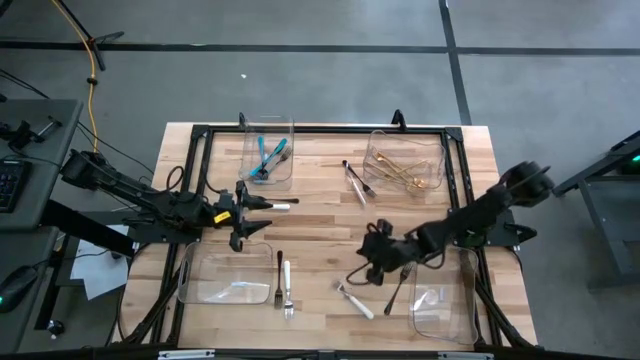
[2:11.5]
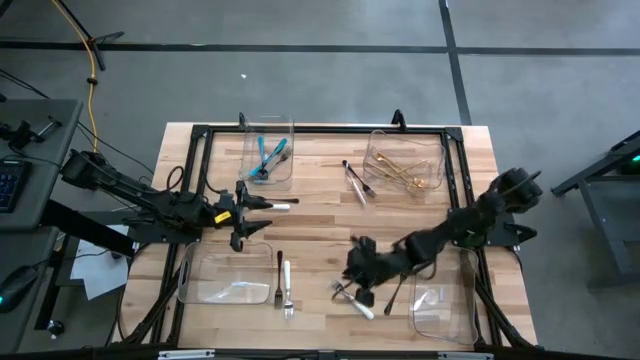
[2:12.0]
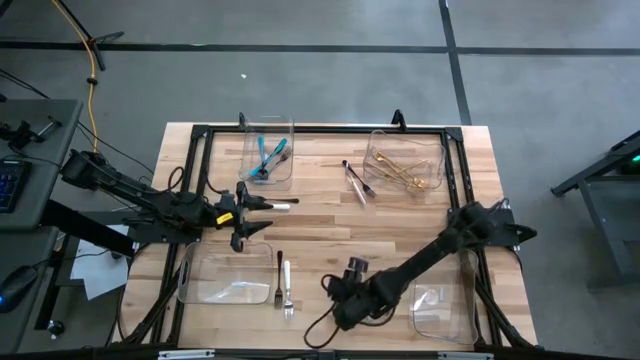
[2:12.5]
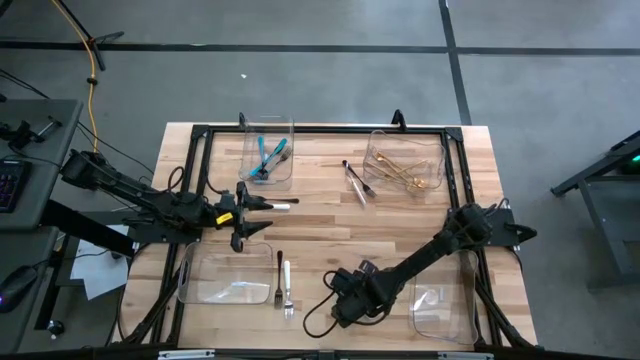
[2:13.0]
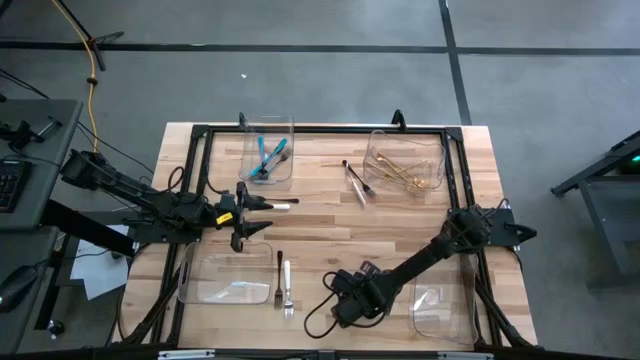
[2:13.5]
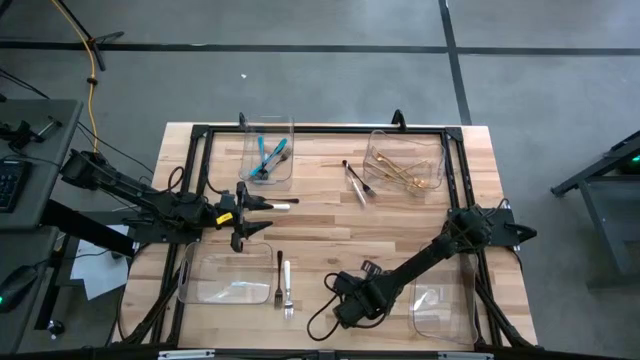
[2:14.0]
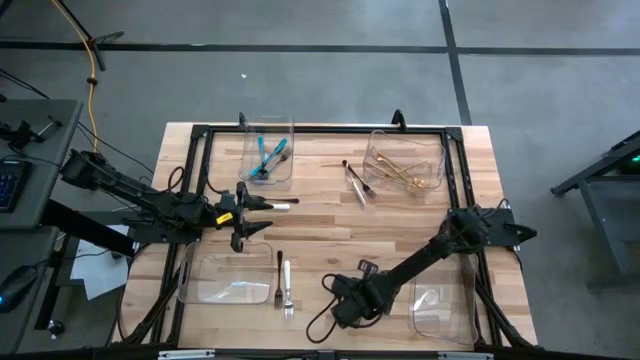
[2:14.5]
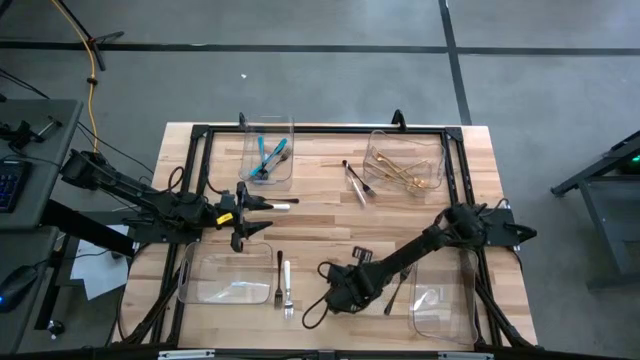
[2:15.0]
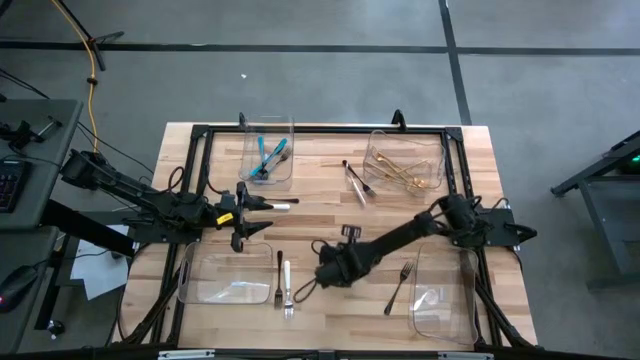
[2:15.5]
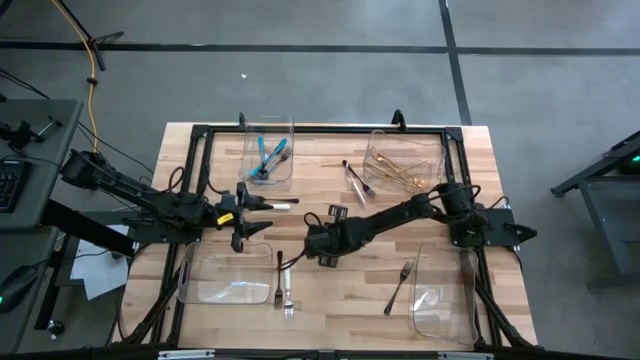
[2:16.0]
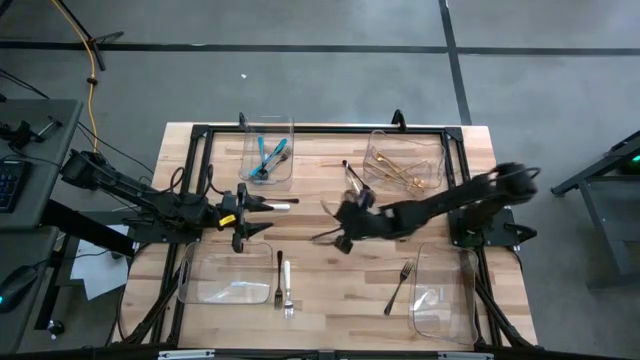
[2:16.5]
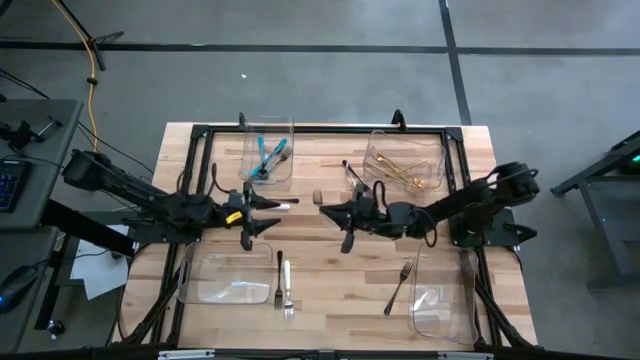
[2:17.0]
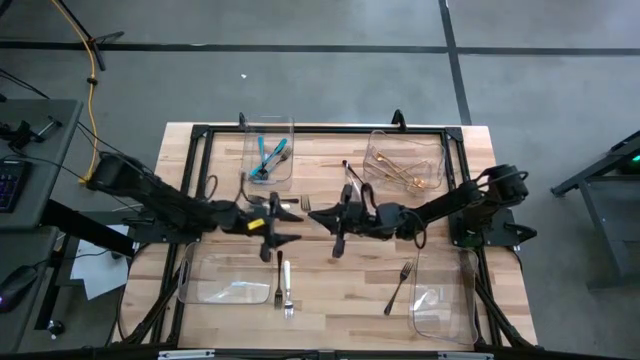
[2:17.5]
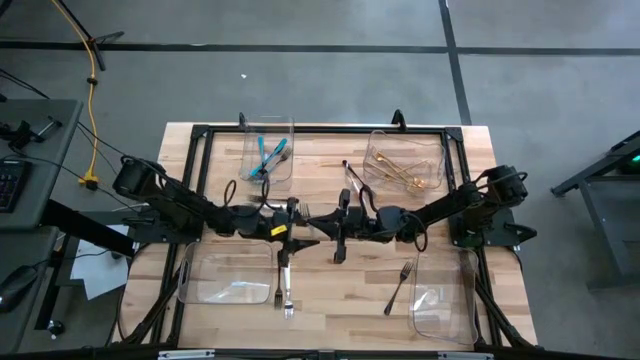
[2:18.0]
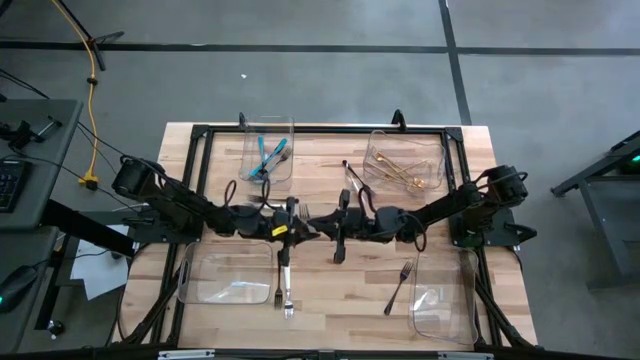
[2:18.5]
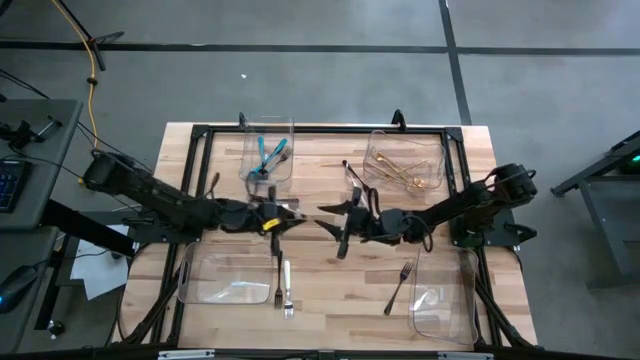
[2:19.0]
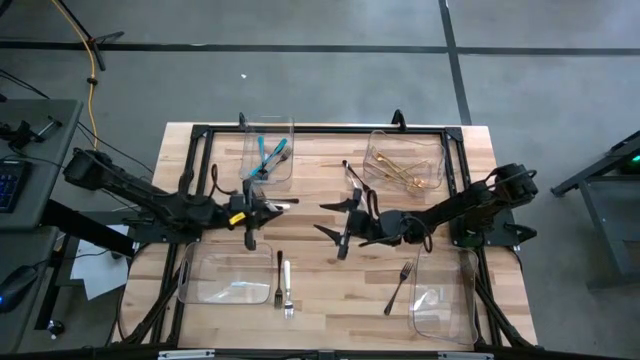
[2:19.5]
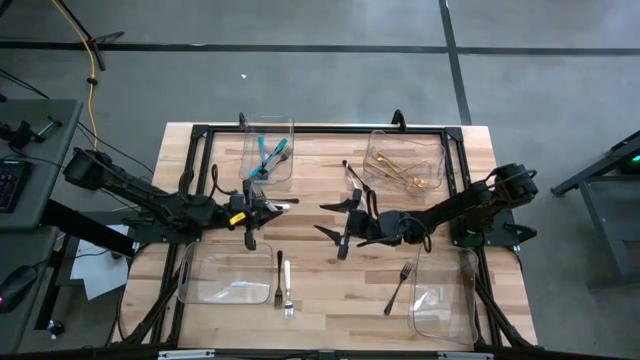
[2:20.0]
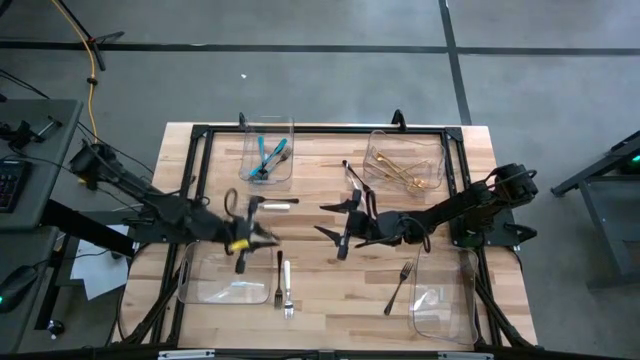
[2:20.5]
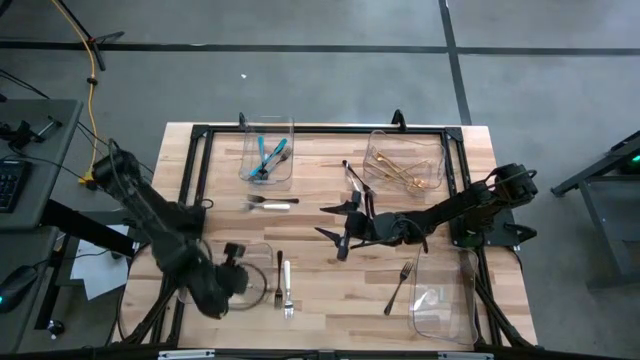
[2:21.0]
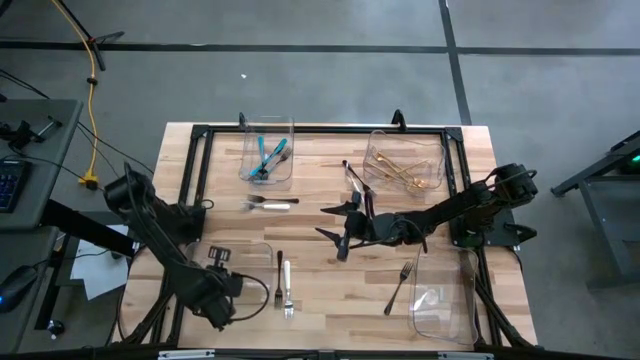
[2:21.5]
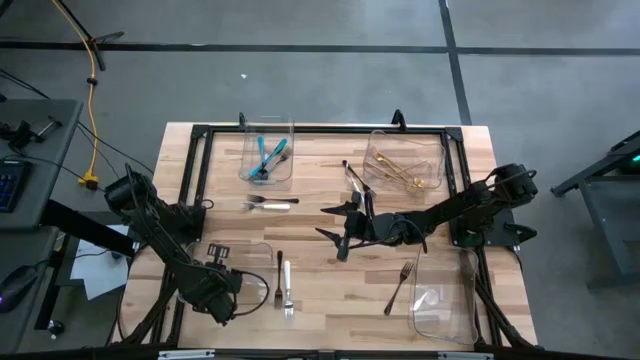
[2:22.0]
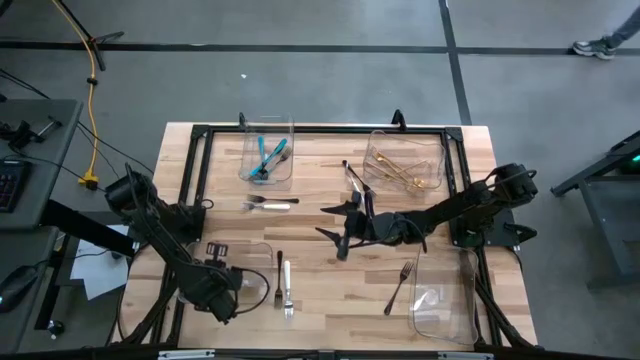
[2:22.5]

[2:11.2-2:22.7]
Task: Sort silverware by color (type)
Put the white fork into the bottom left transparent bin

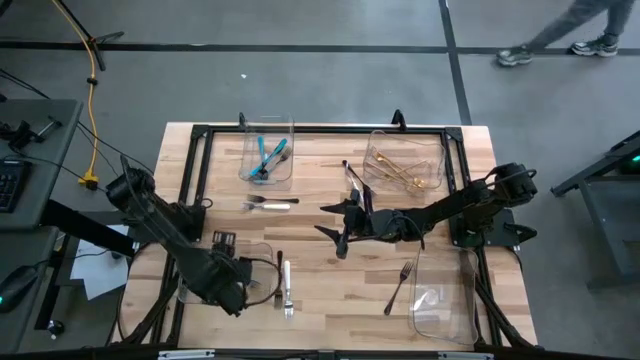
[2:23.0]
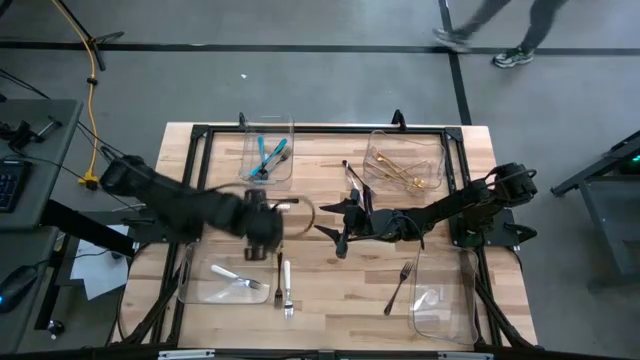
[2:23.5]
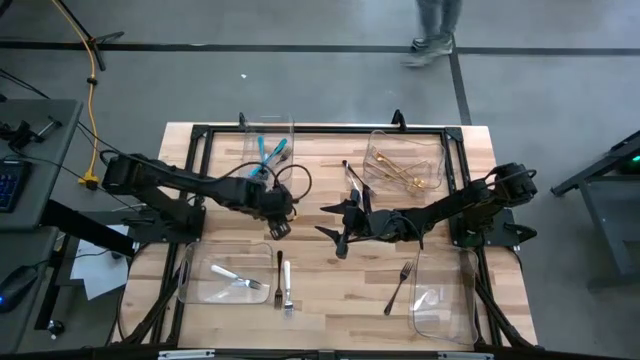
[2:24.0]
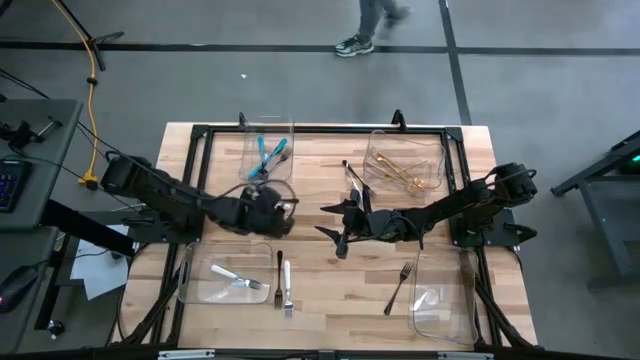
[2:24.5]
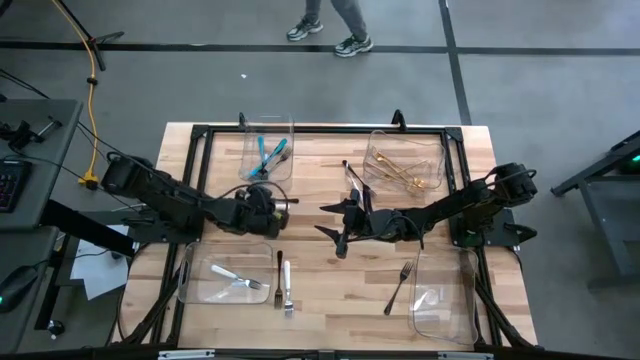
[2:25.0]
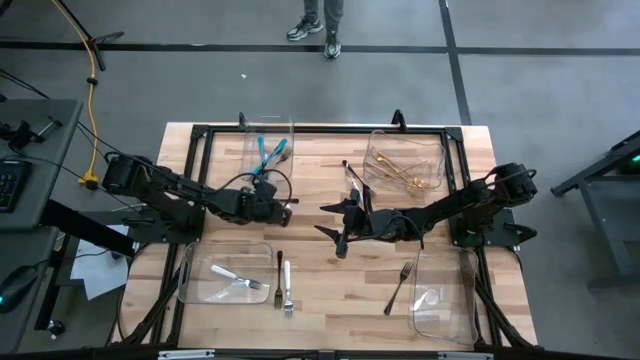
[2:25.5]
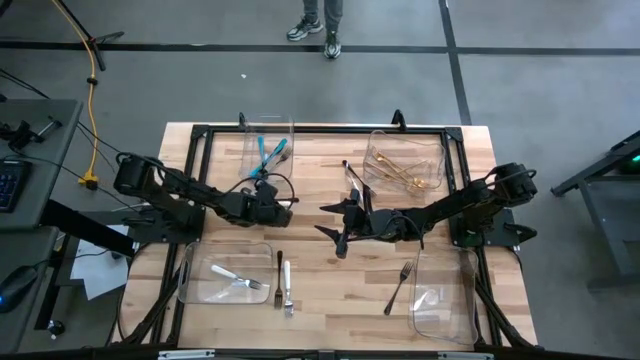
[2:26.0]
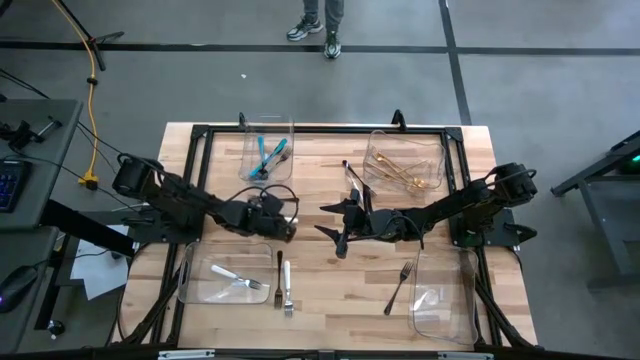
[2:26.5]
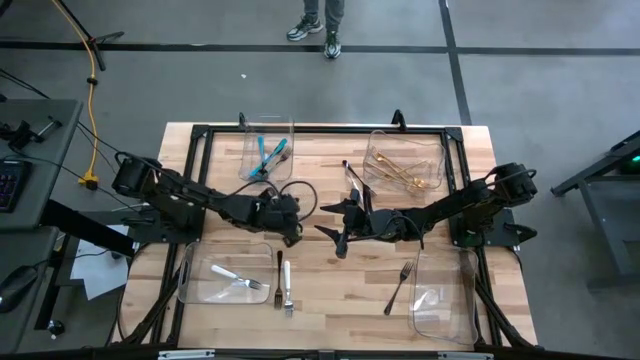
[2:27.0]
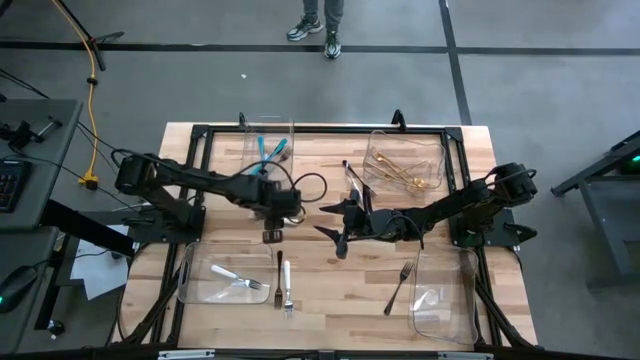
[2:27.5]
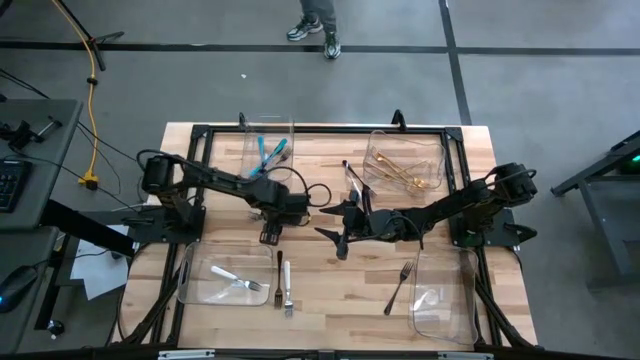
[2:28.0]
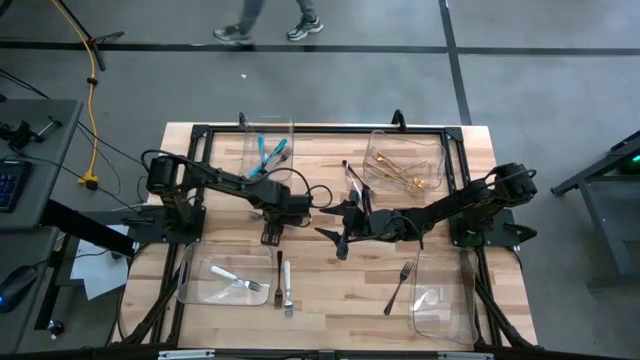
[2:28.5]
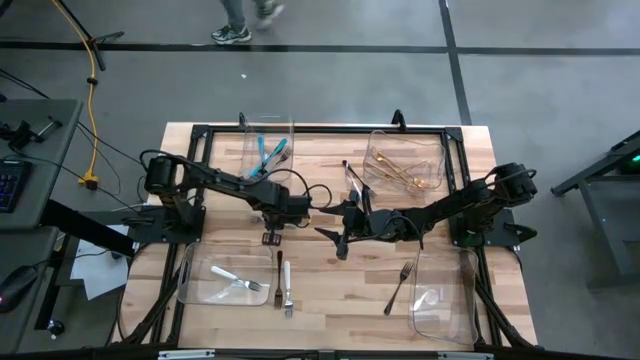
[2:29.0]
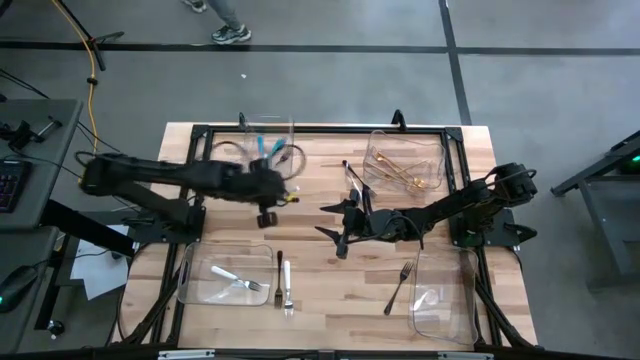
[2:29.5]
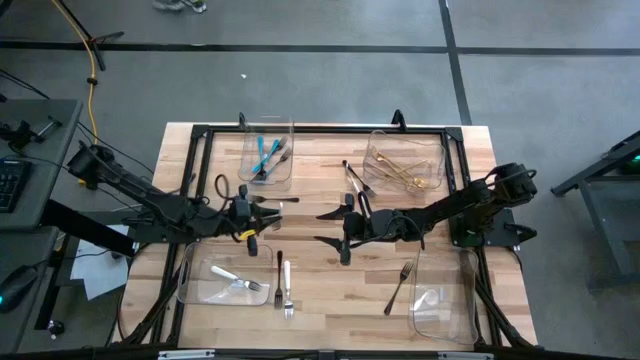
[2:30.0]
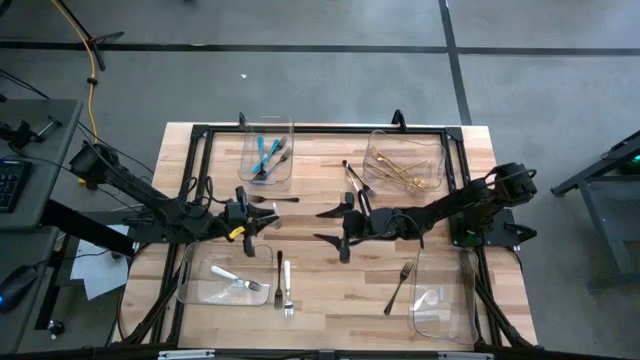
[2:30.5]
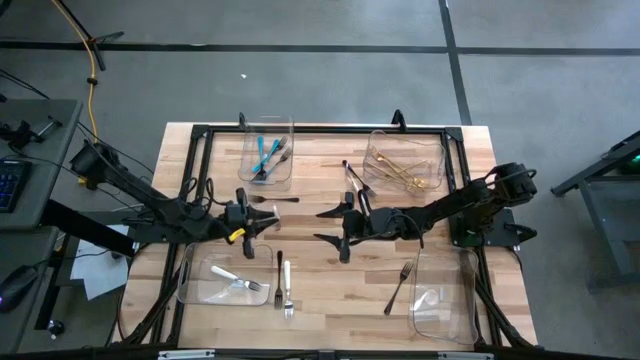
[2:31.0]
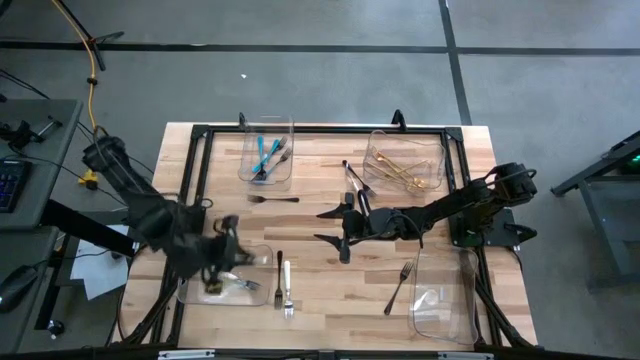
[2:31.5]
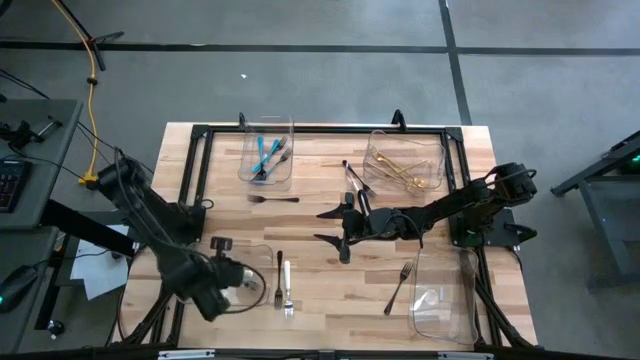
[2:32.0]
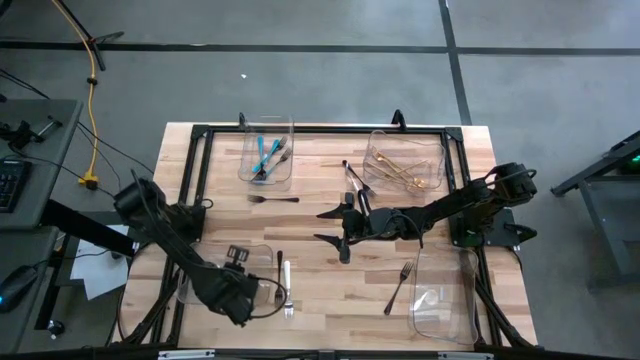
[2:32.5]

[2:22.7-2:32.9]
Put the white fork into the bottom left transparent bin
